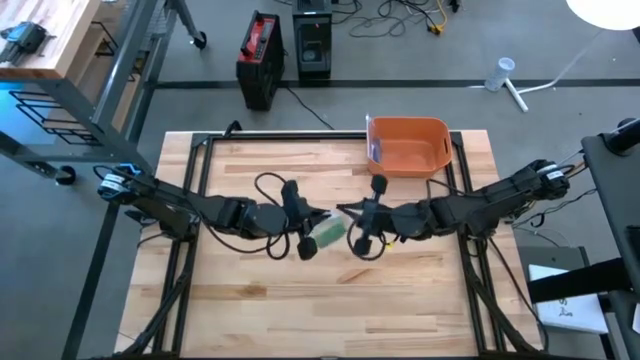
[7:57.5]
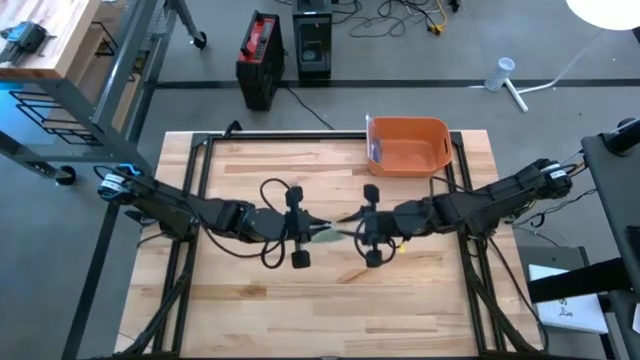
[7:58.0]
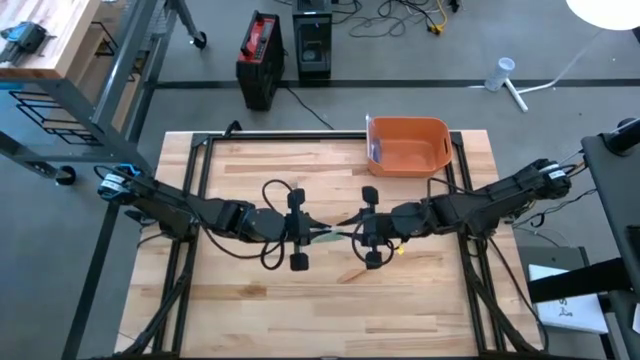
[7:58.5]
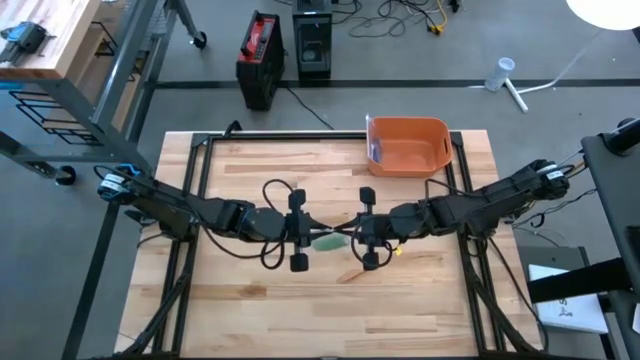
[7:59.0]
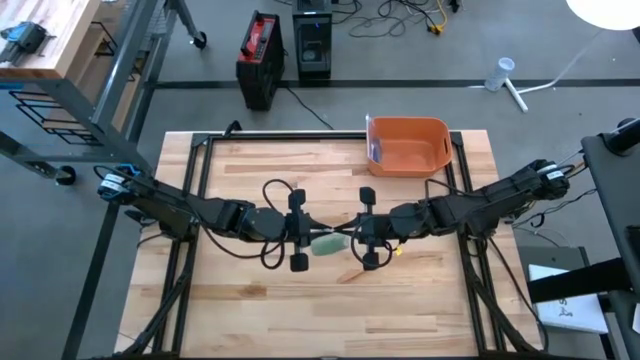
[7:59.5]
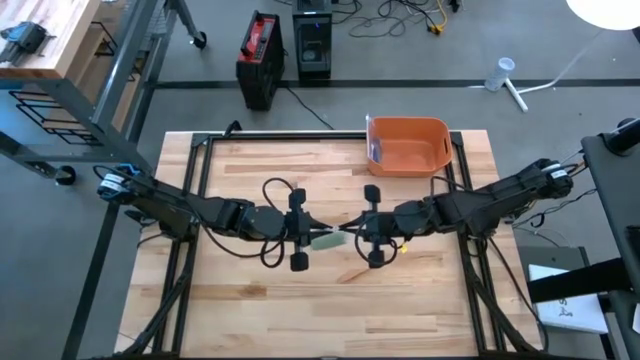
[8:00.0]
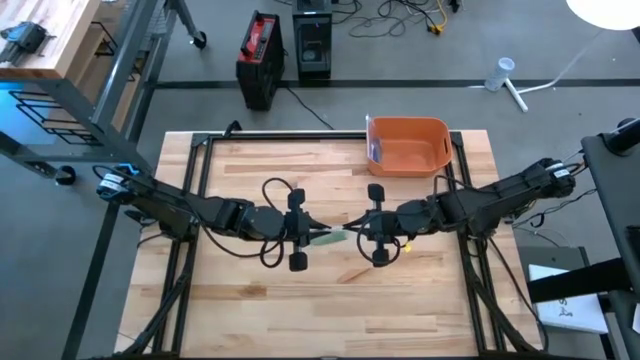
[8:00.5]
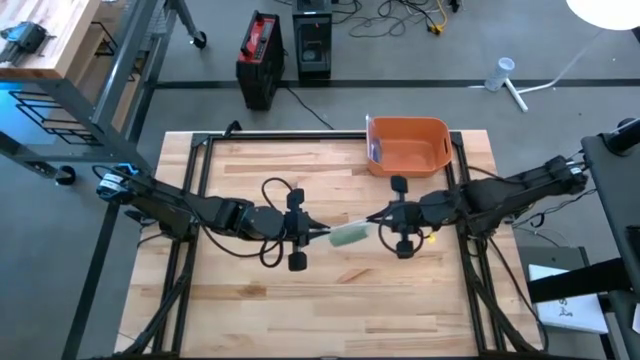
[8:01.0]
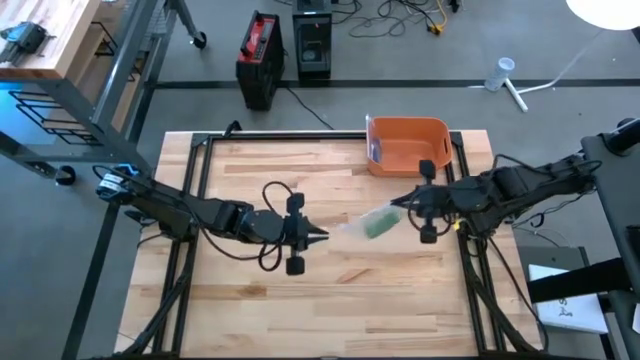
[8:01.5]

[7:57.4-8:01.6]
Task: Roll bandage
Close the transparent zip bag

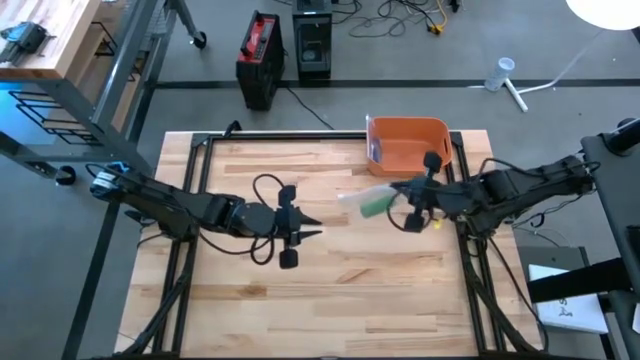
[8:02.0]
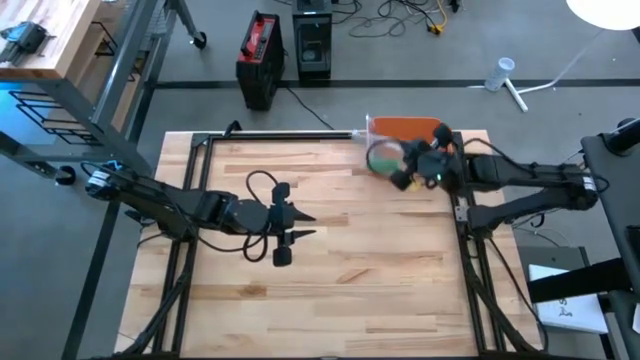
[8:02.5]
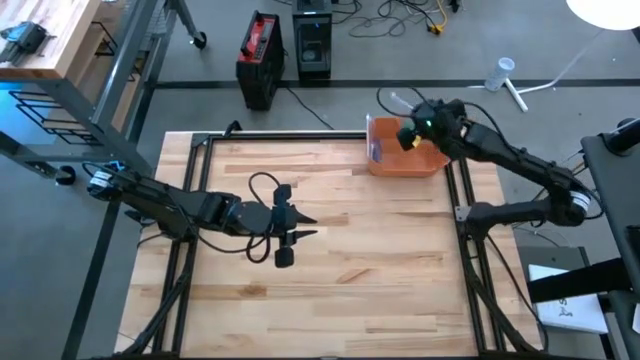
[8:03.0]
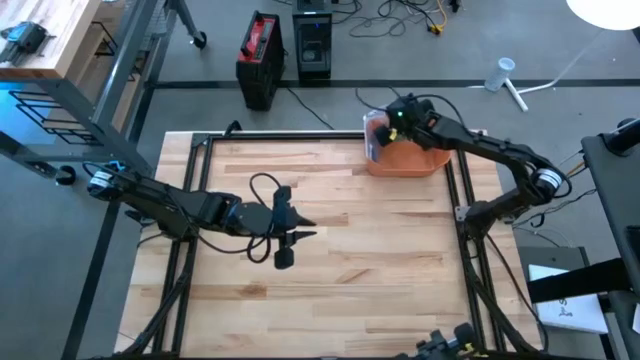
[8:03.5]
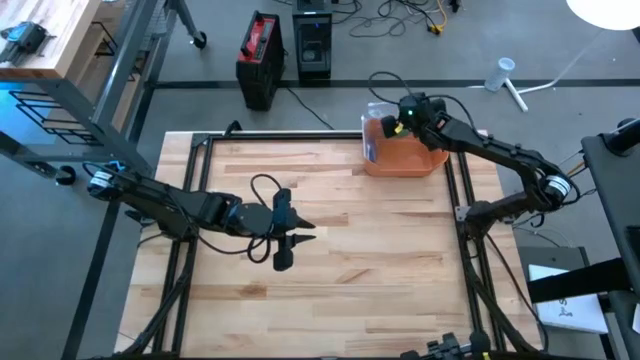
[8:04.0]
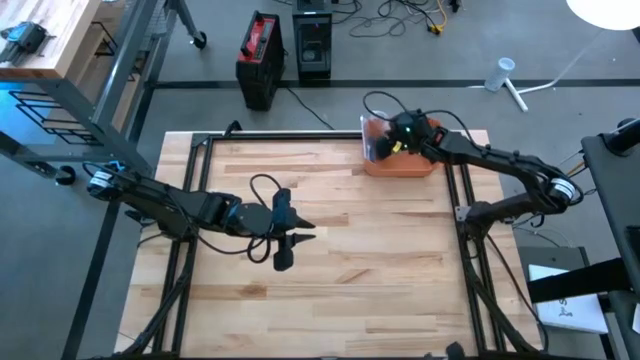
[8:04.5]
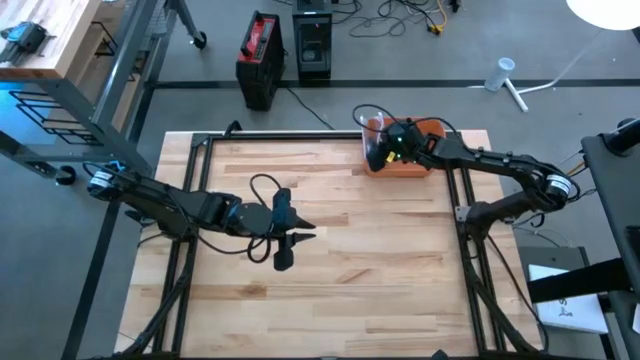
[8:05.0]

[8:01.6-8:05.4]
Put the transparent zip bag into the orange bin

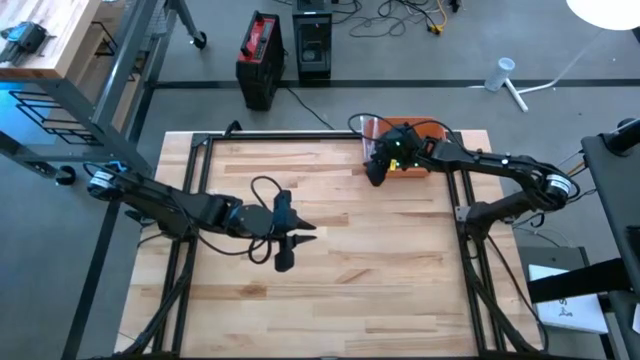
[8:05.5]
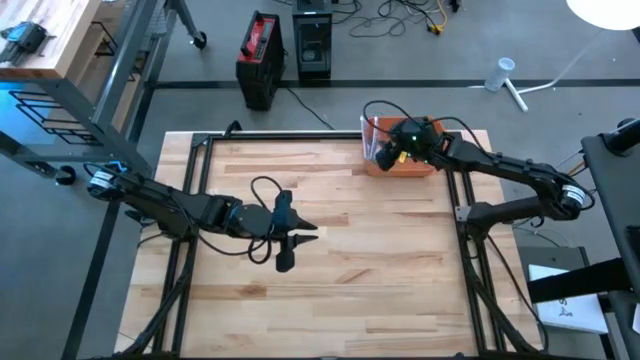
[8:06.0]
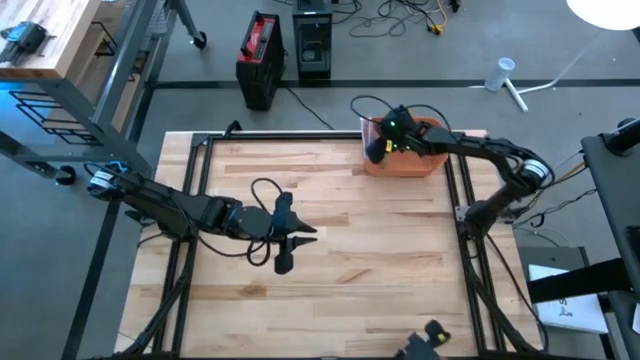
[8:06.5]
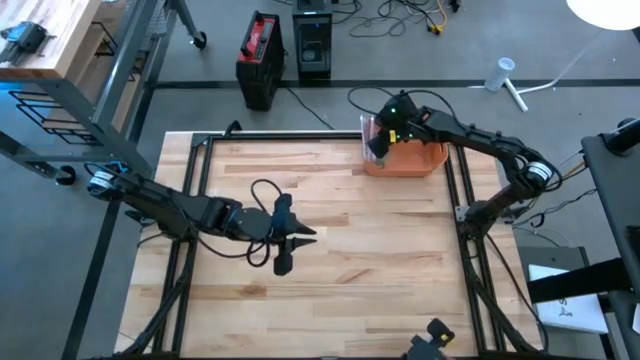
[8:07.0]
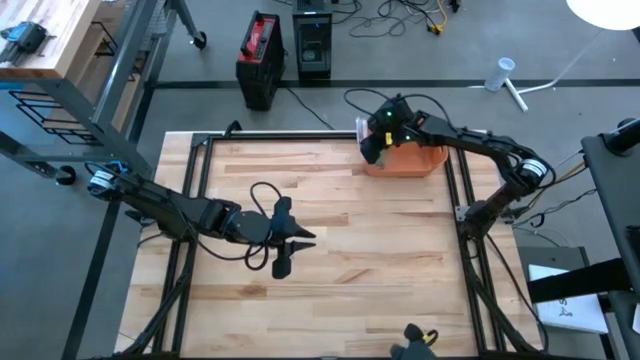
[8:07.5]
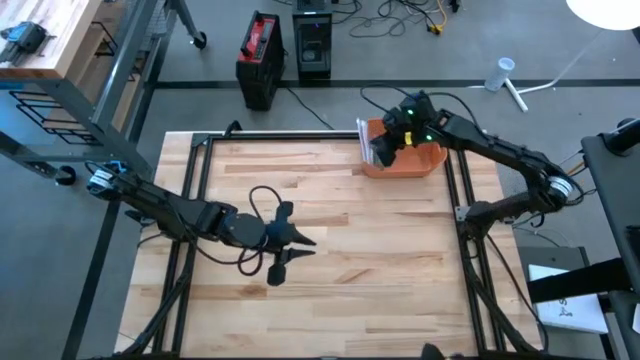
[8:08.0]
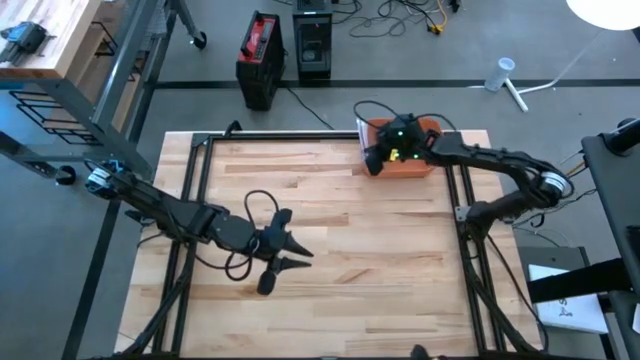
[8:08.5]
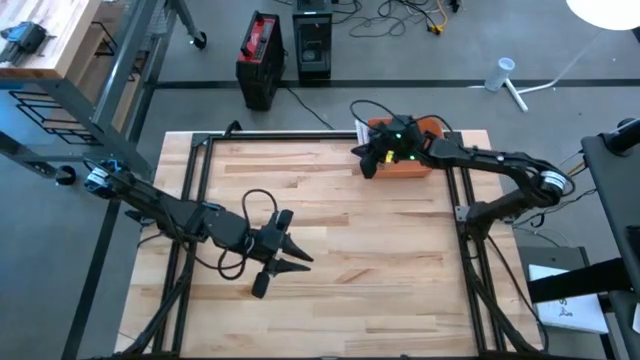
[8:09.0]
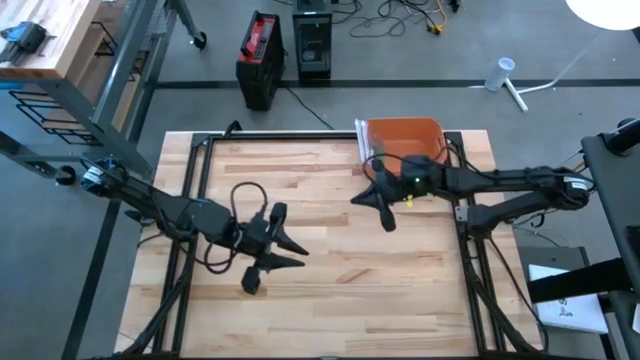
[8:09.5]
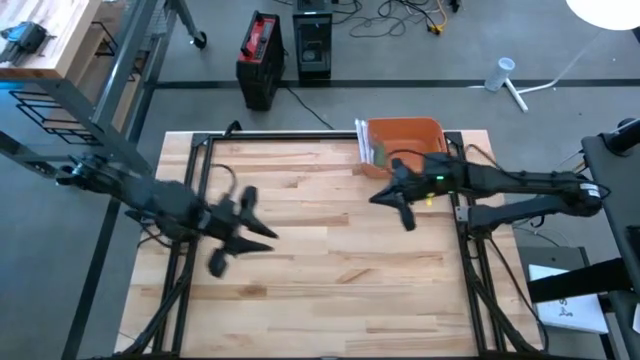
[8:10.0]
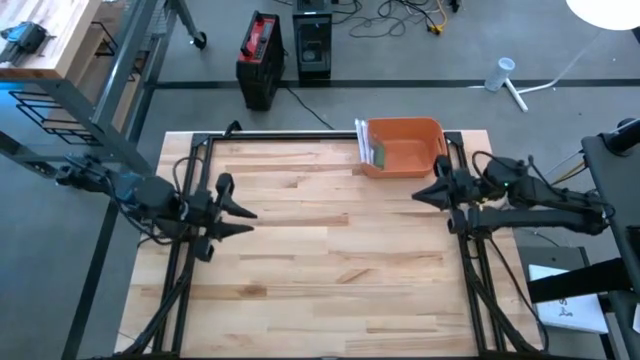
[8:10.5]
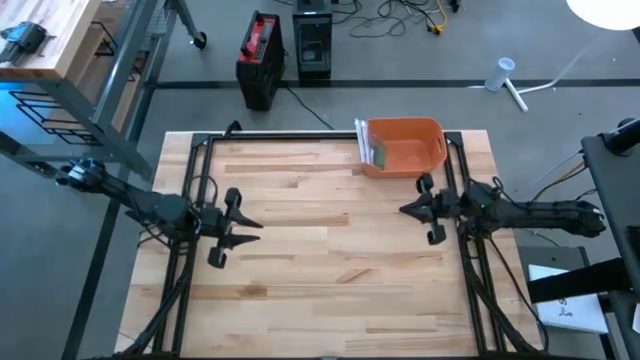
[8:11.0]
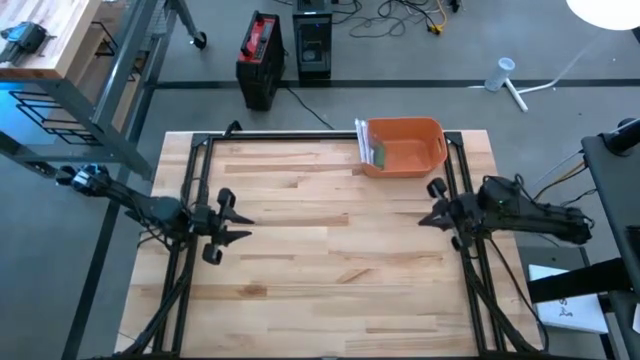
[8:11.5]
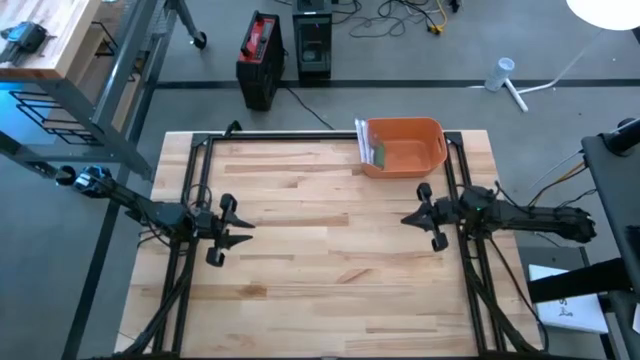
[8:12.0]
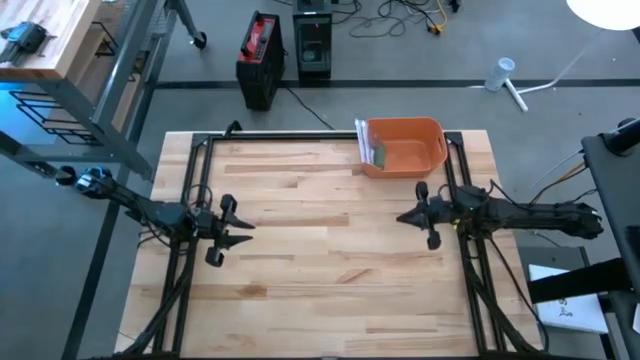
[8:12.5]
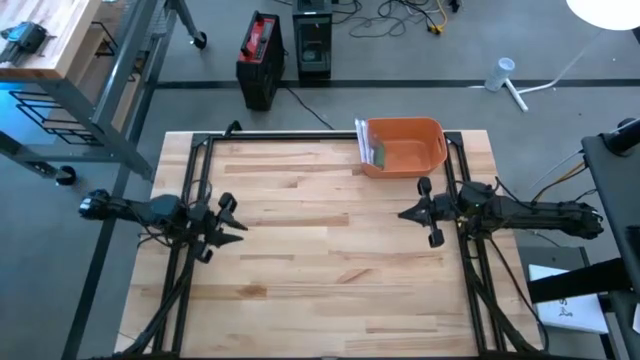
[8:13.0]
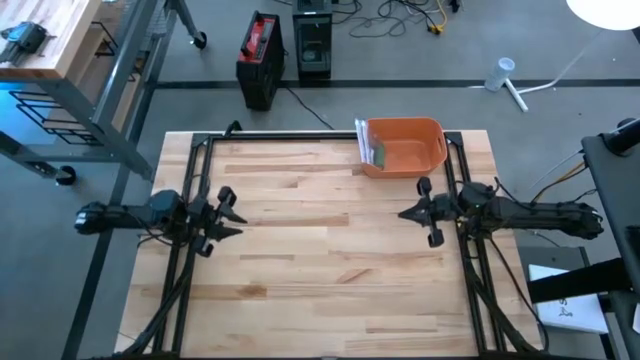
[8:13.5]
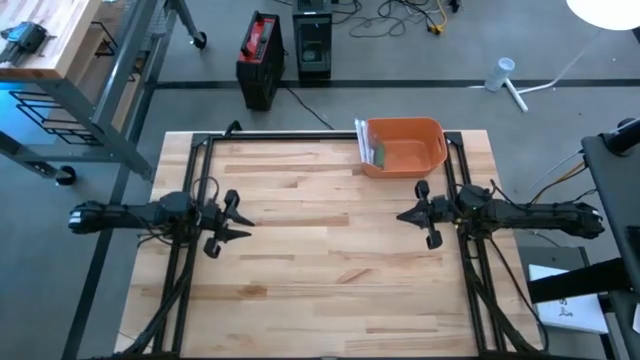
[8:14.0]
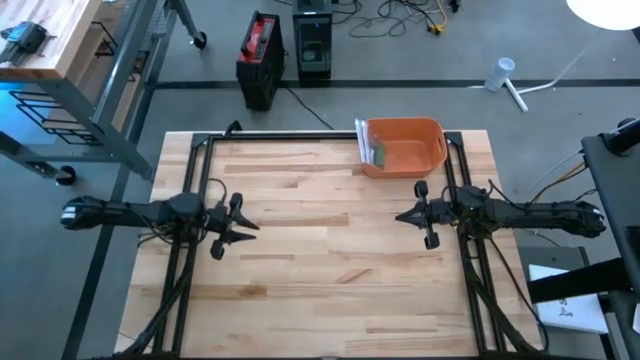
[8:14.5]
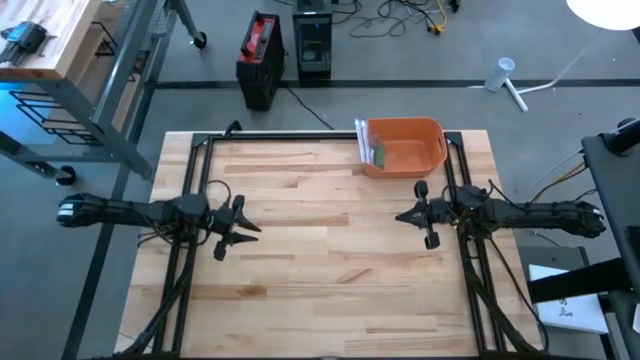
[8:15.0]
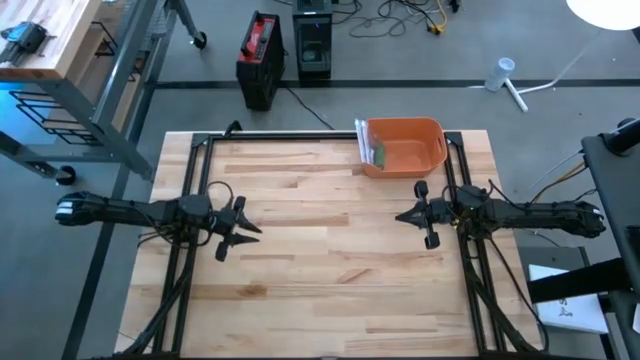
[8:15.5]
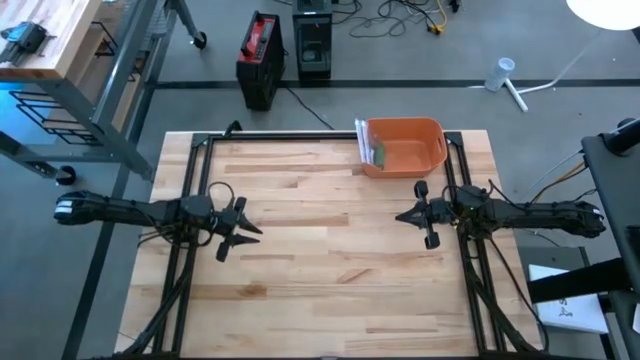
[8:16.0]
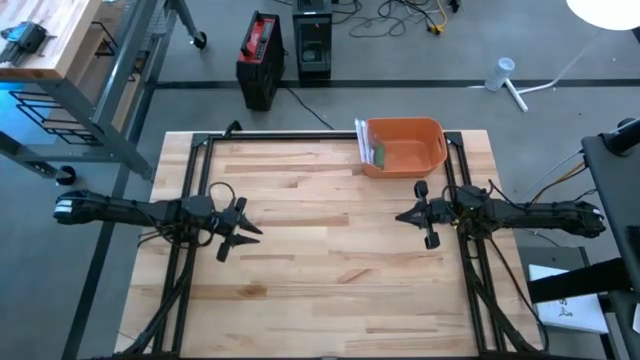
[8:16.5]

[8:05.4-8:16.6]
Return to Home Position
